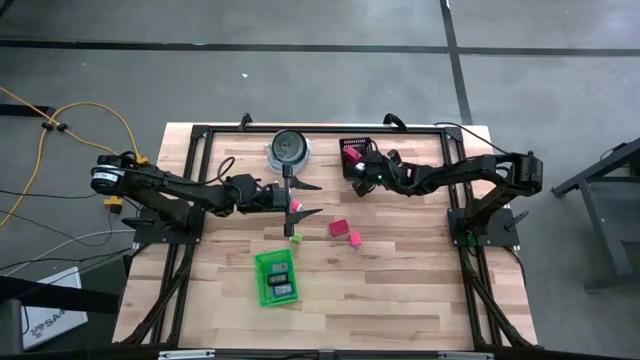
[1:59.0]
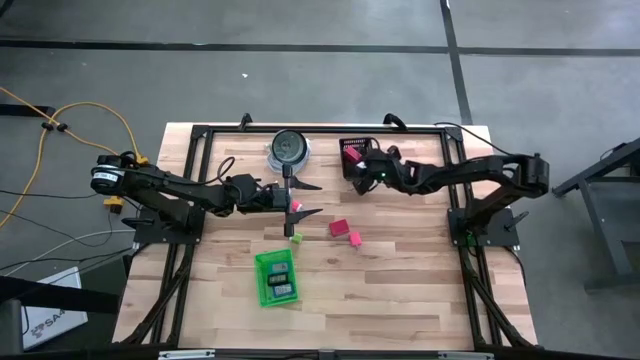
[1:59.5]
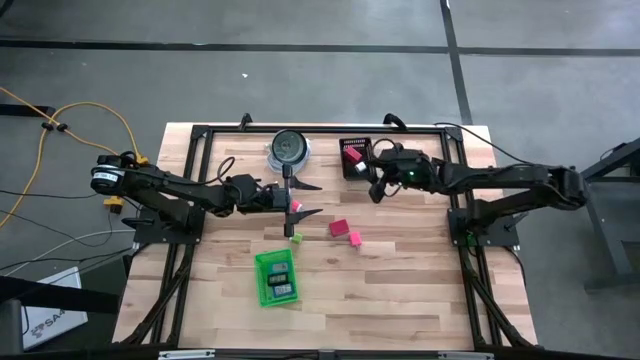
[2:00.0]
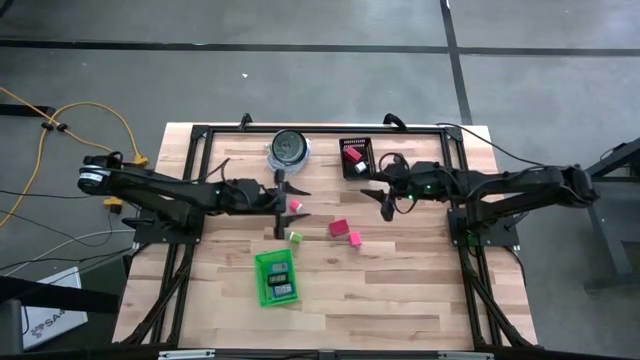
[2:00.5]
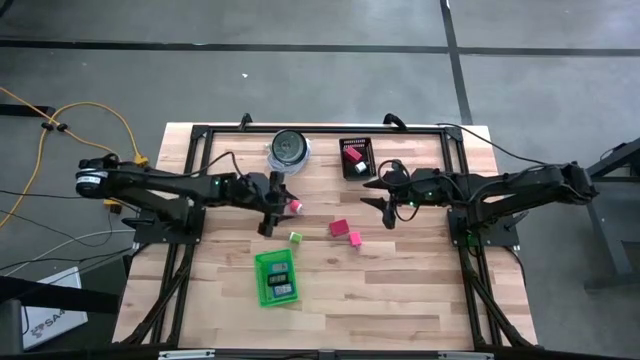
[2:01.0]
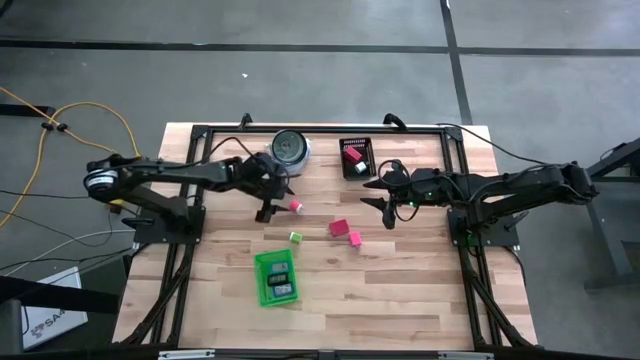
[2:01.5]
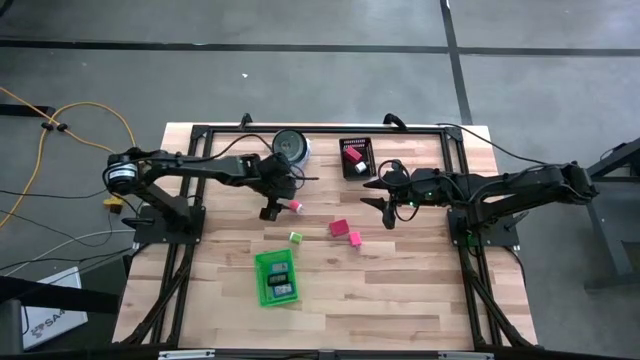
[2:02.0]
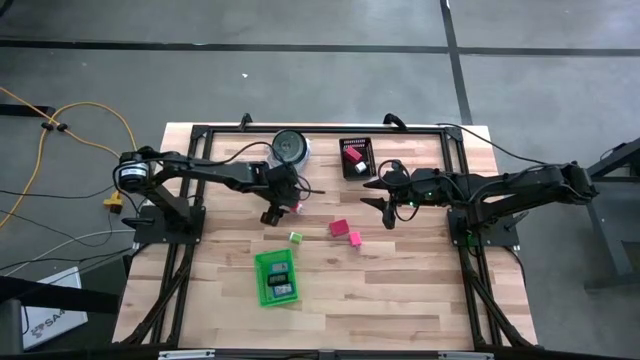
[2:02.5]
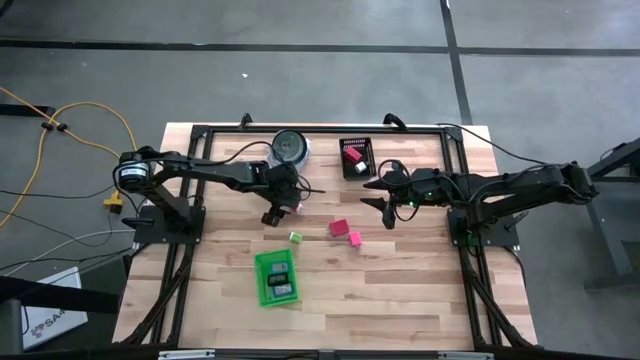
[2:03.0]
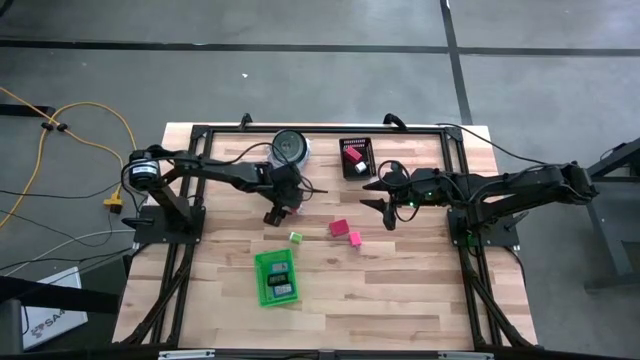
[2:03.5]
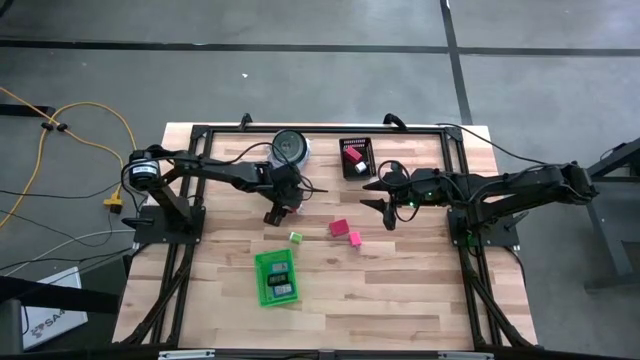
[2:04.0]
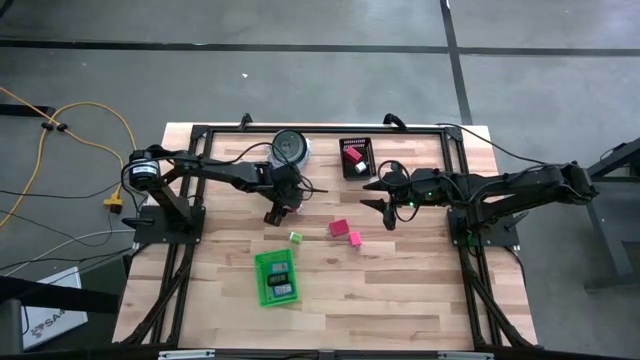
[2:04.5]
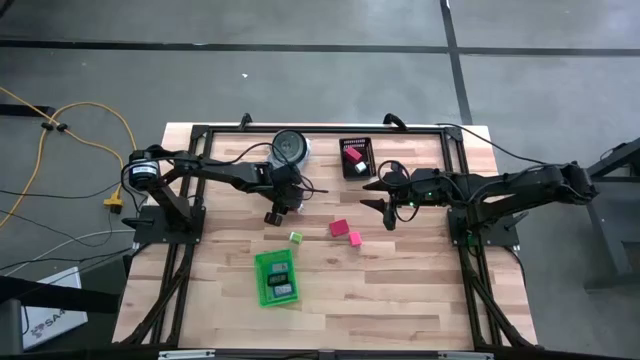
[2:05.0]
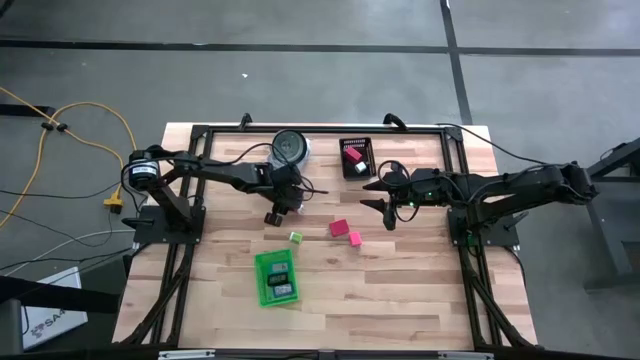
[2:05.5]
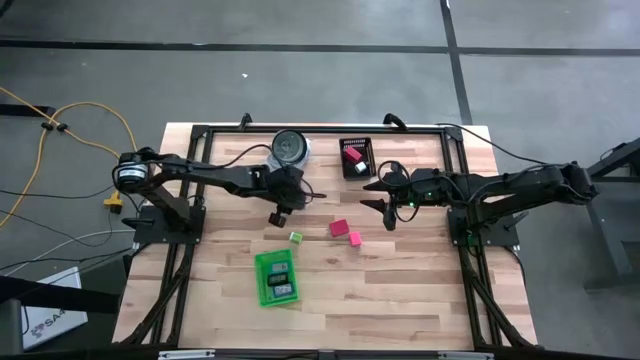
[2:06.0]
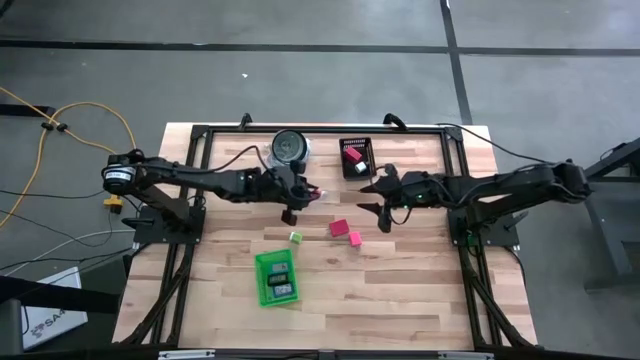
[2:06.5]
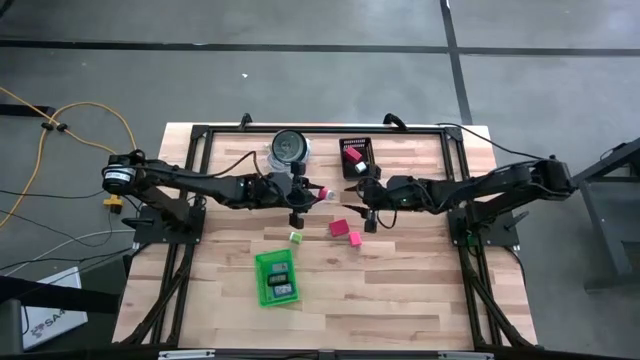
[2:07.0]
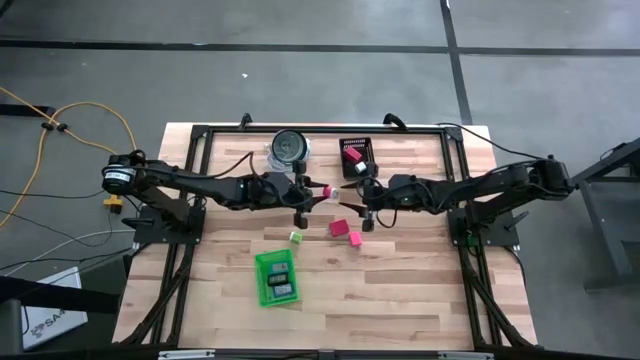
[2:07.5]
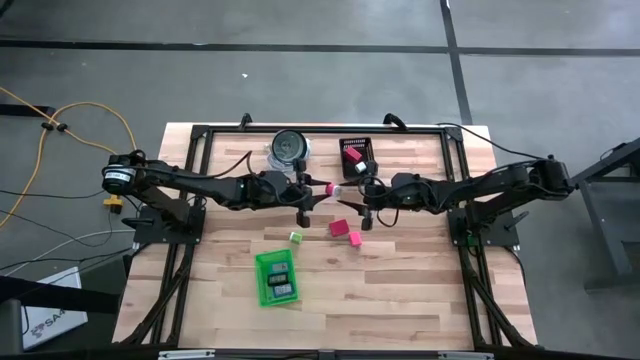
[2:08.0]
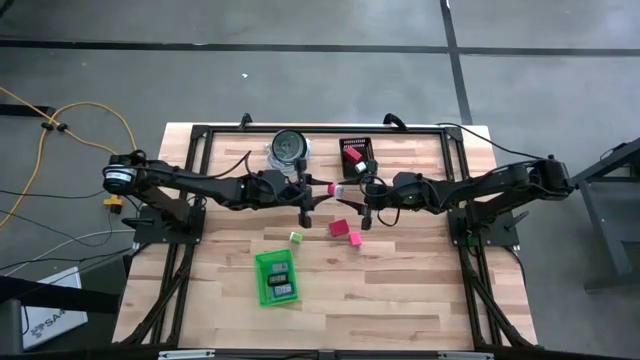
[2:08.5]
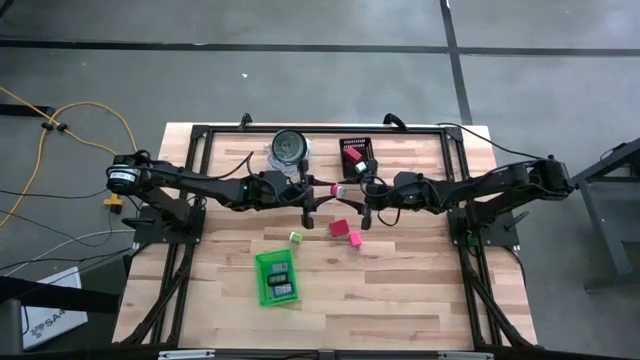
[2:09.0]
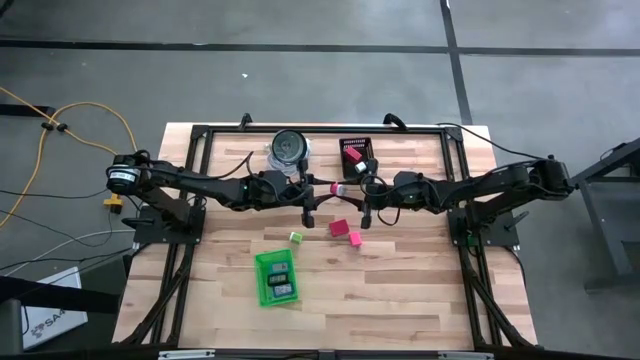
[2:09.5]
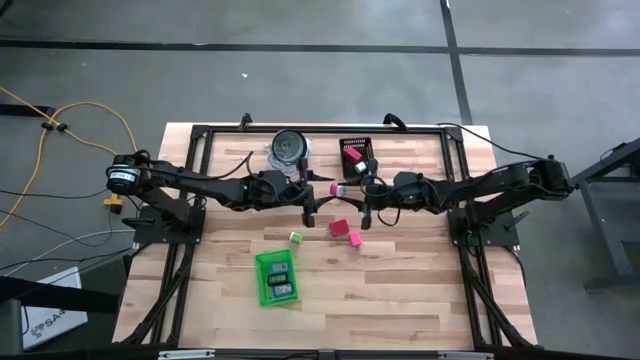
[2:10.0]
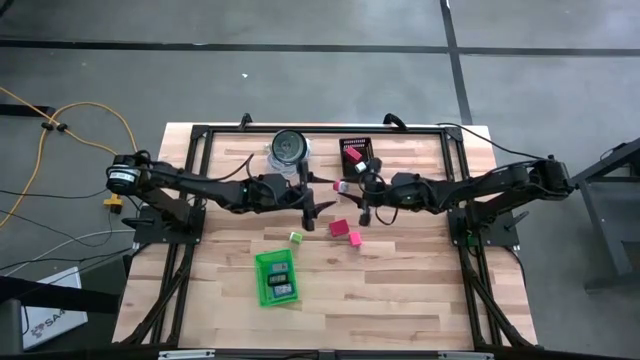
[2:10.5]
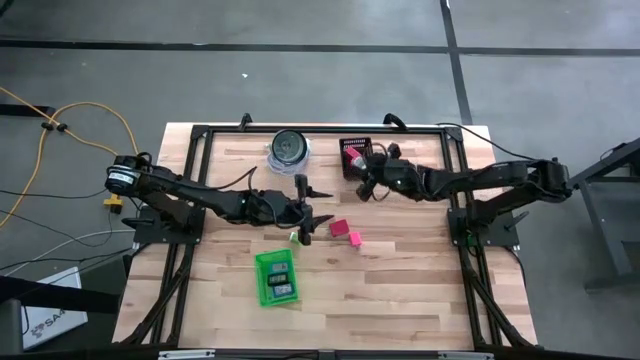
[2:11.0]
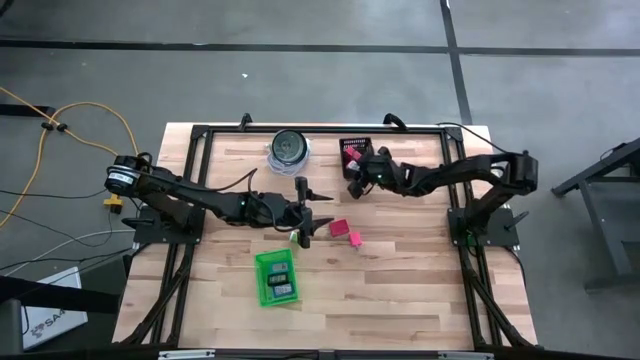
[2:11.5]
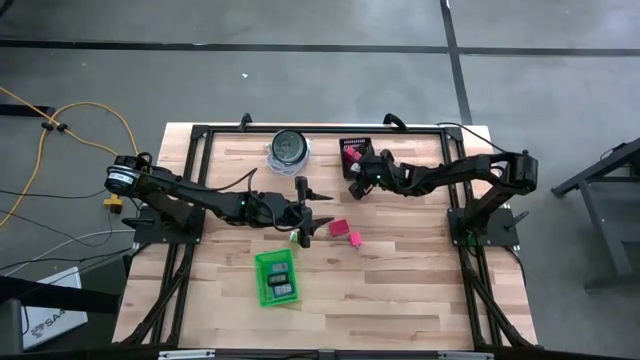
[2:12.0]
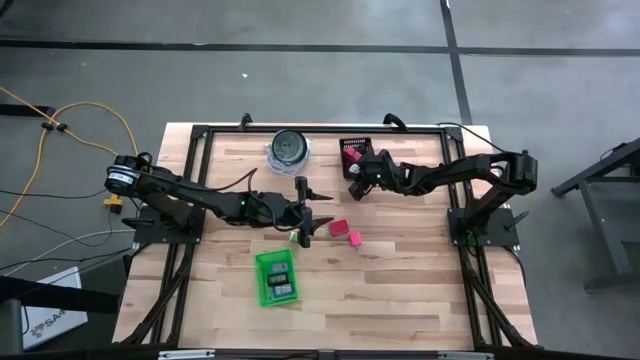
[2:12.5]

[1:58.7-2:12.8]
Task: Pick & Place Office items
Put the pink charger adapter into the black bin
